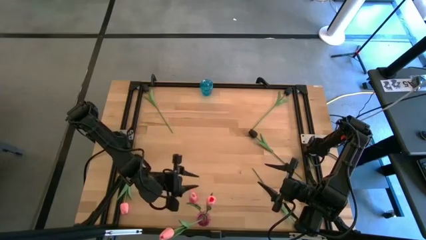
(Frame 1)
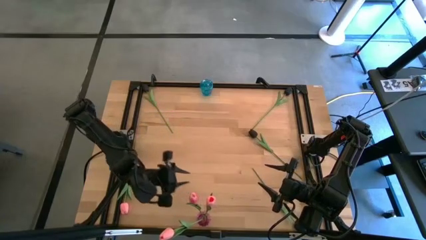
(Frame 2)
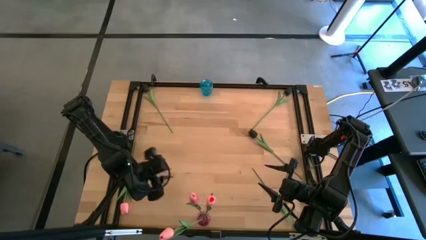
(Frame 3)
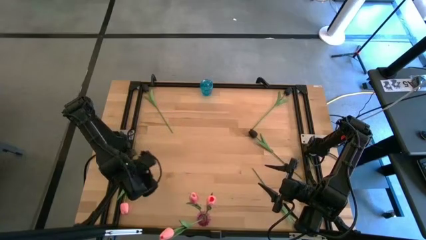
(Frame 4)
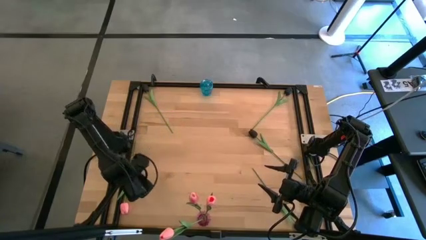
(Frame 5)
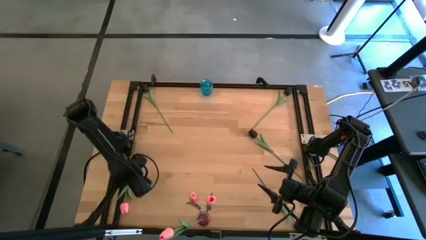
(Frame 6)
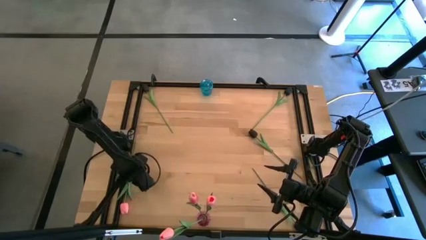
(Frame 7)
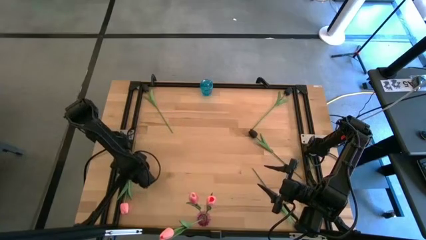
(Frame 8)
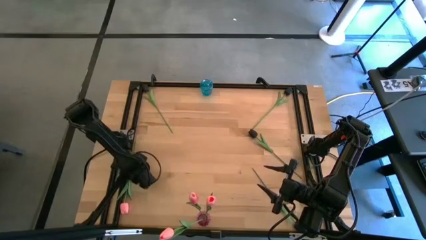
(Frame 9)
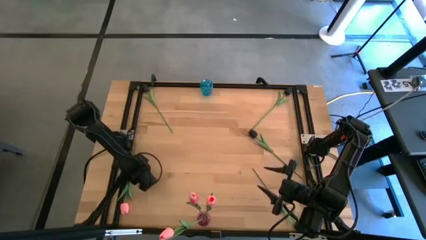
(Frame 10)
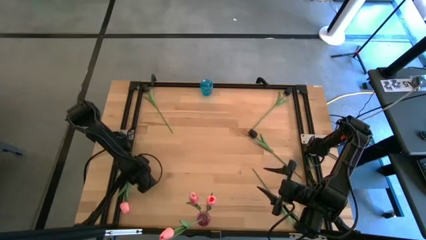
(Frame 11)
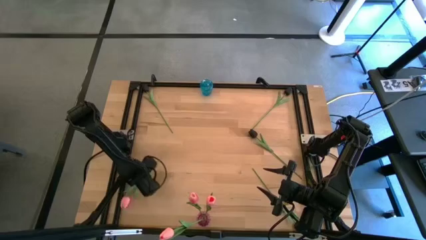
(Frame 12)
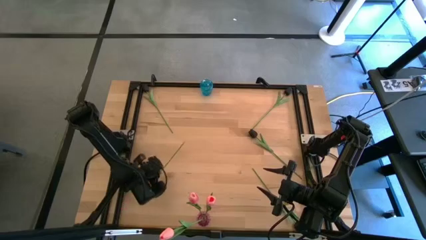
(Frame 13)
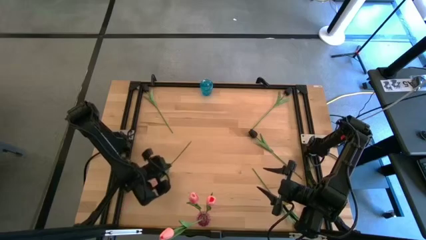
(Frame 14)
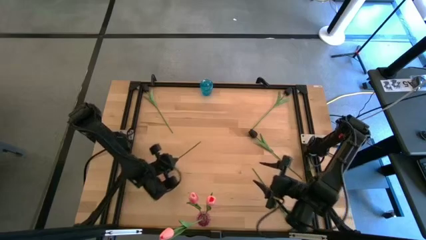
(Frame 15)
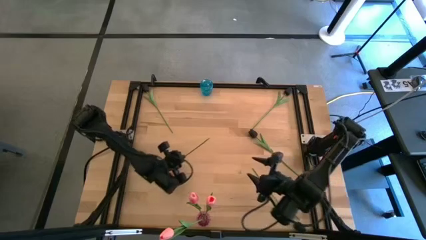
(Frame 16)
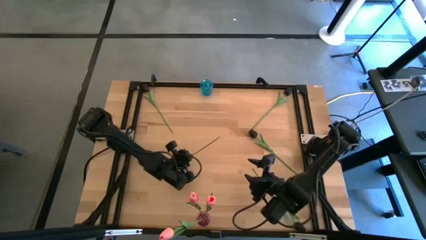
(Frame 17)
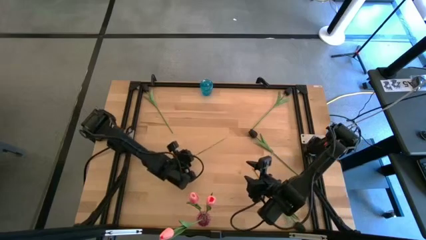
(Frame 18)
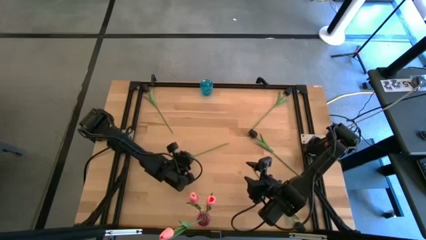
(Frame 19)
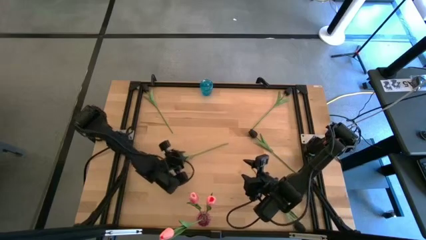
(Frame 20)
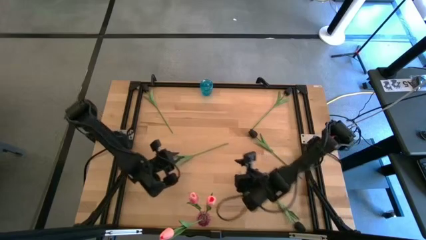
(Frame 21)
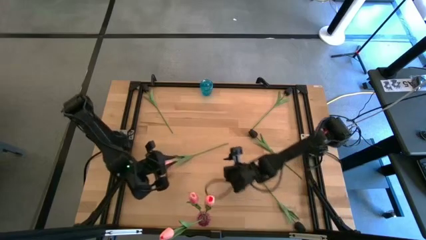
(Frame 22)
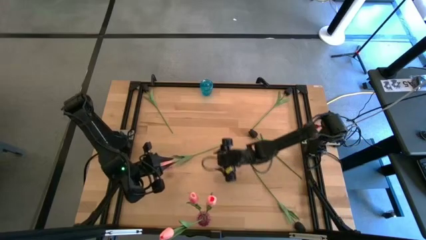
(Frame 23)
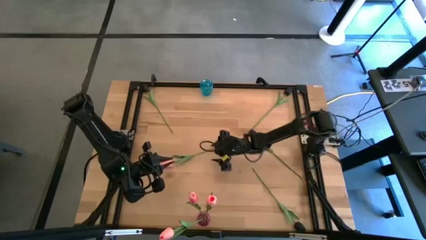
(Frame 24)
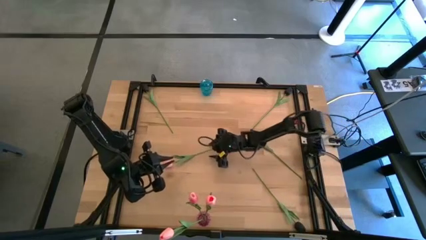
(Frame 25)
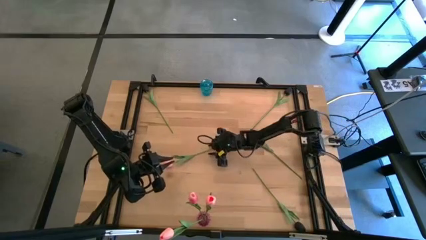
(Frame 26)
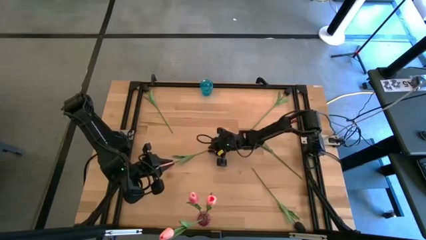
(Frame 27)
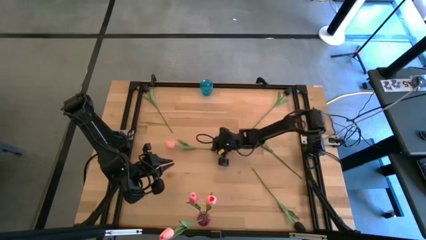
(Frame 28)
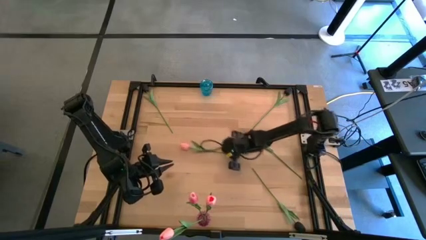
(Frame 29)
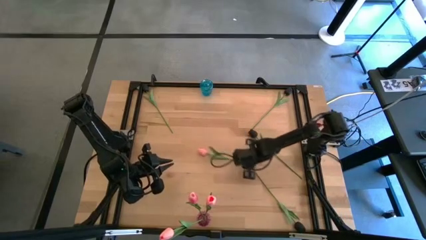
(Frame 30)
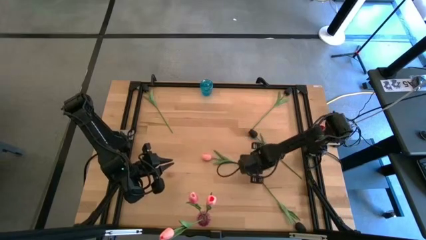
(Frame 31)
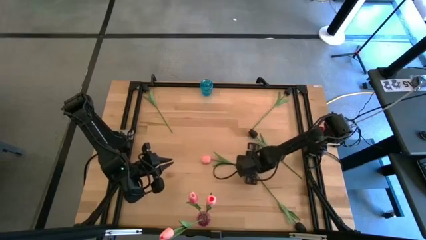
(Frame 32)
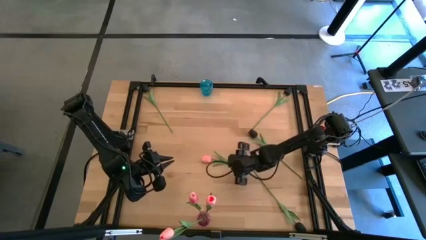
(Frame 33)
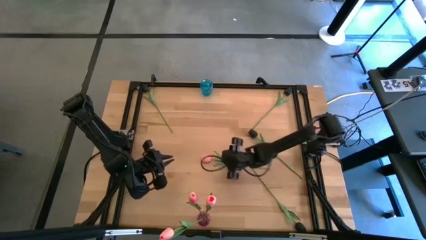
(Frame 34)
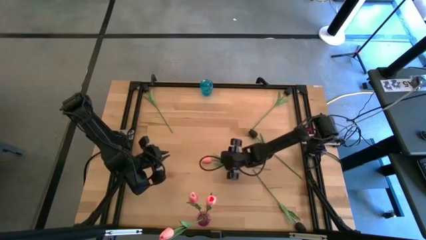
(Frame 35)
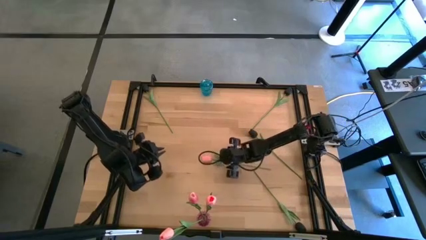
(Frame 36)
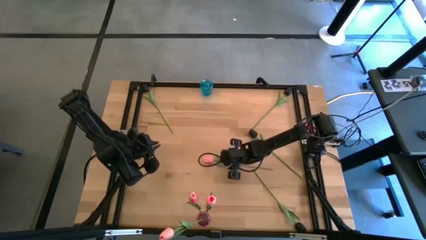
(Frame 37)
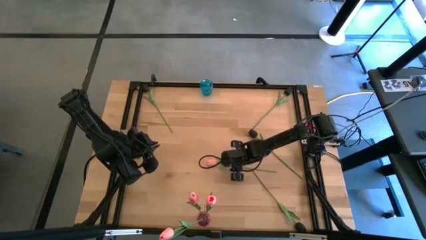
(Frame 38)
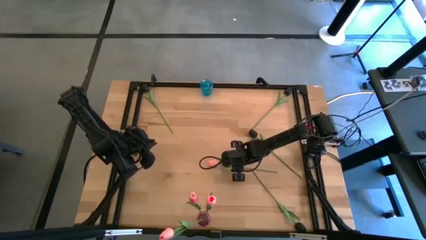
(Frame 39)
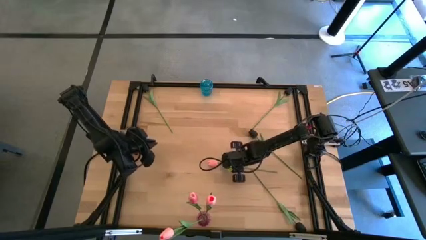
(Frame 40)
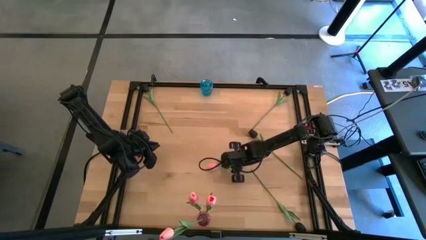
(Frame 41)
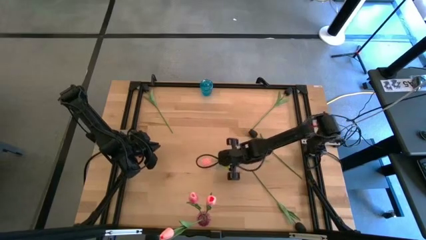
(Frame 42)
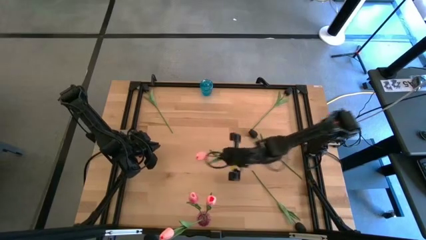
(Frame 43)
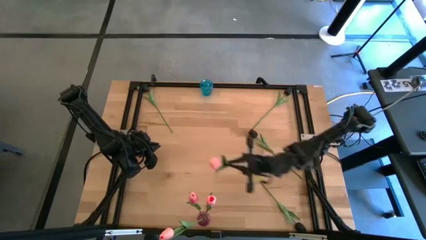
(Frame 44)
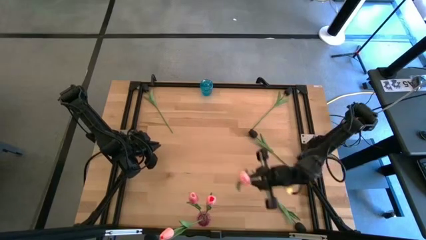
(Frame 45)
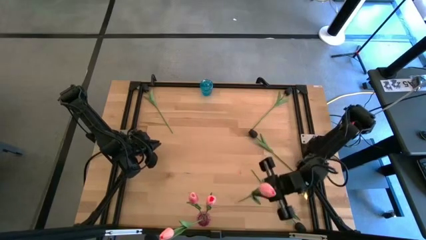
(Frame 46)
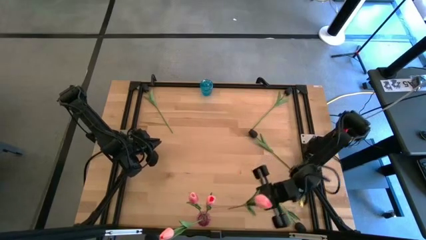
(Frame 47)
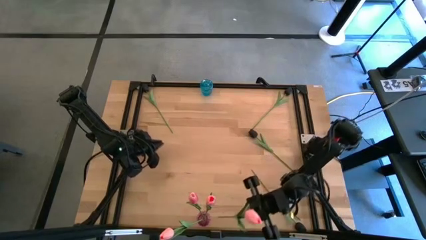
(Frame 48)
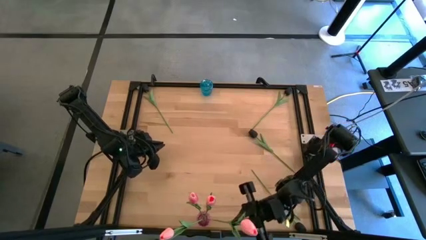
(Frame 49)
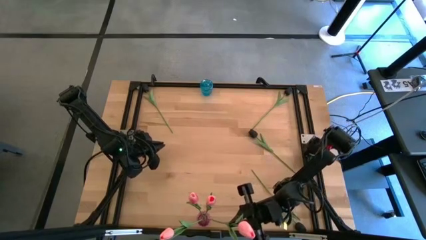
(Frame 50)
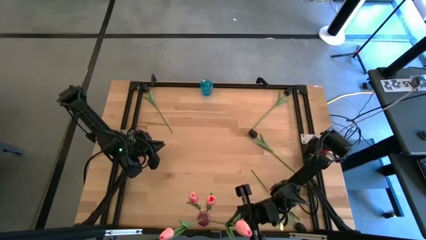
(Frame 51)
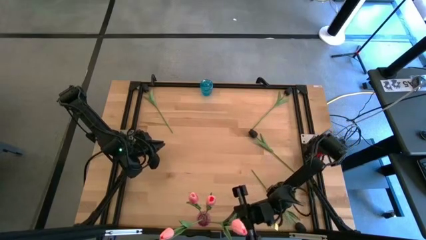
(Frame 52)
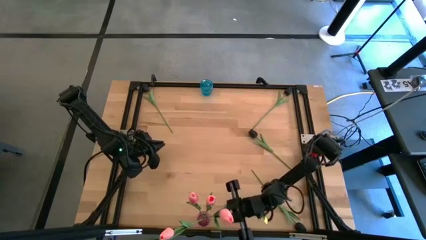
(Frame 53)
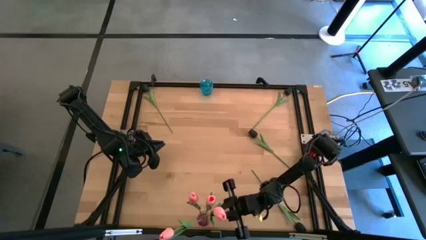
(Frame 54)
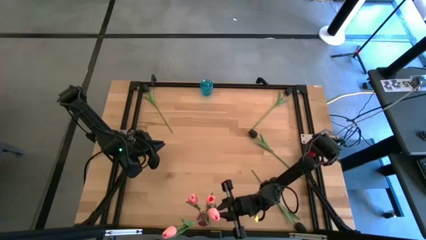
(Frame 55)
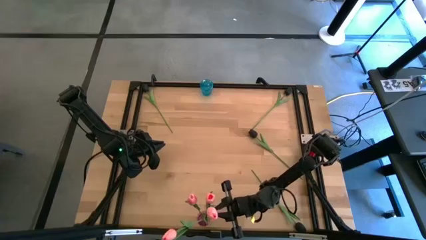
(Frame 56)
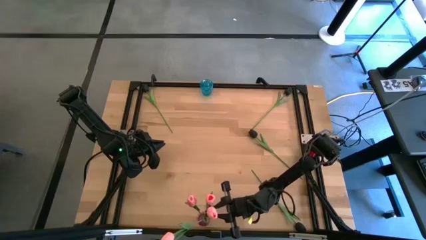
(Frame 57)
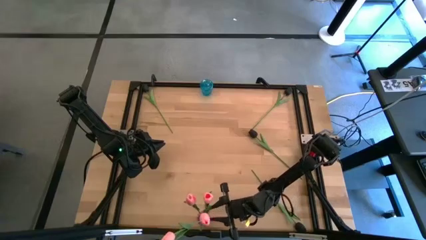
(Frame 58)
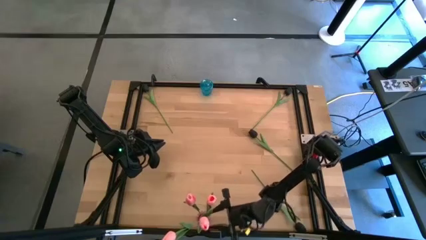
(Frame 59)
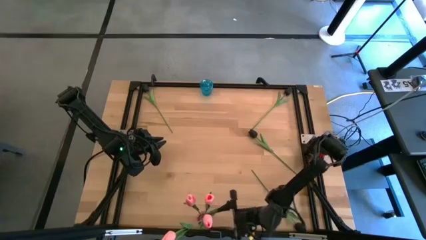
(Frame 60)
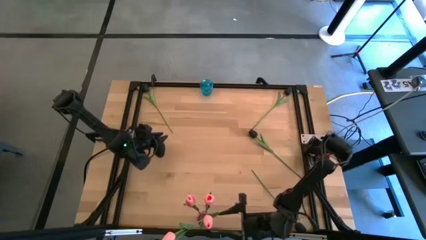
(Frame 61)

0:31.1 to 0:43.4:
Task: Sort flowers into vase by color
Put the pink flower into the violet vase

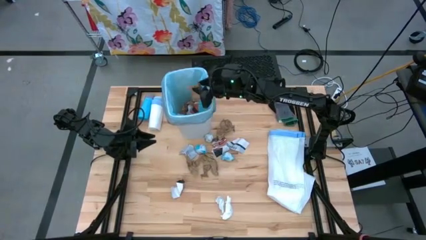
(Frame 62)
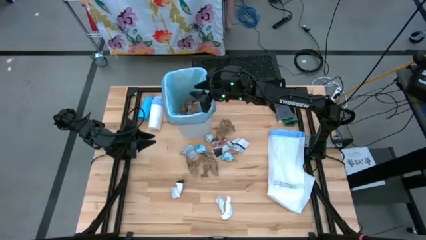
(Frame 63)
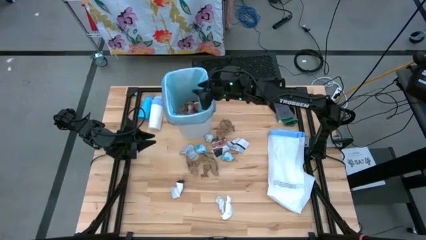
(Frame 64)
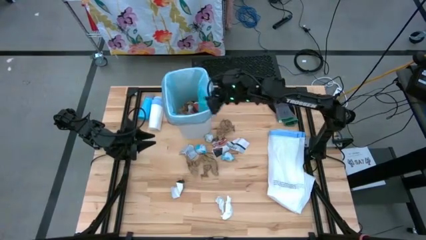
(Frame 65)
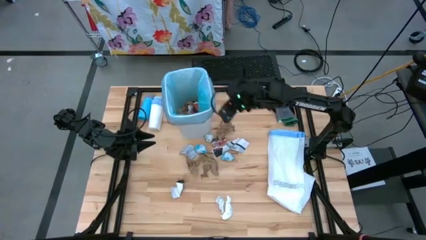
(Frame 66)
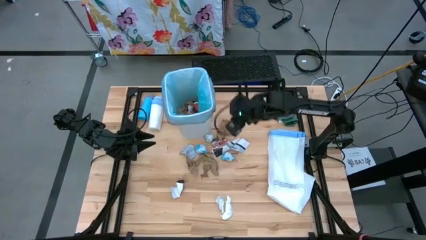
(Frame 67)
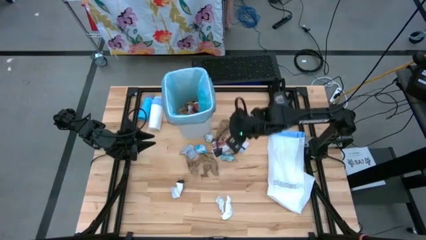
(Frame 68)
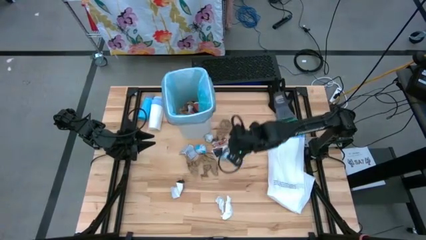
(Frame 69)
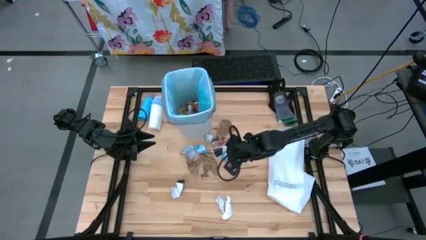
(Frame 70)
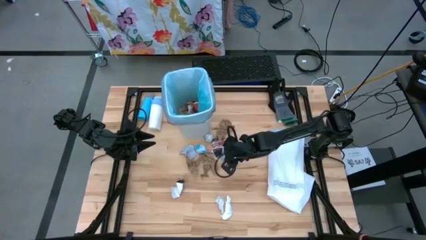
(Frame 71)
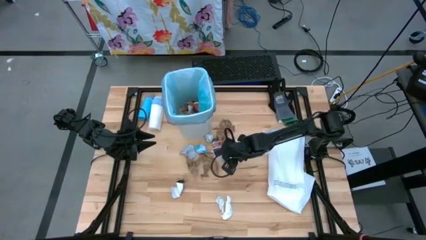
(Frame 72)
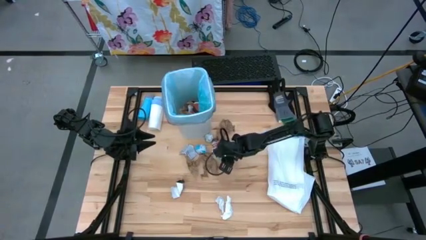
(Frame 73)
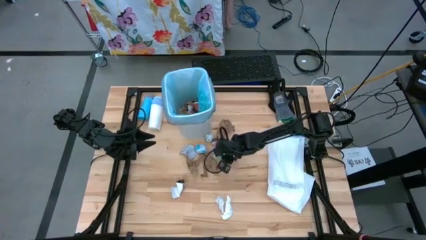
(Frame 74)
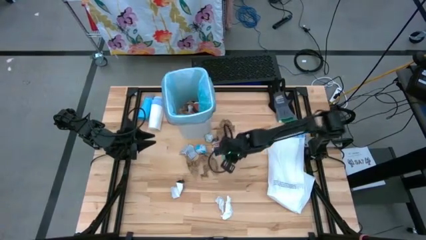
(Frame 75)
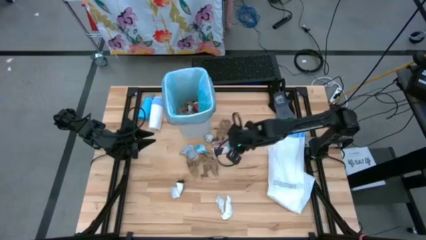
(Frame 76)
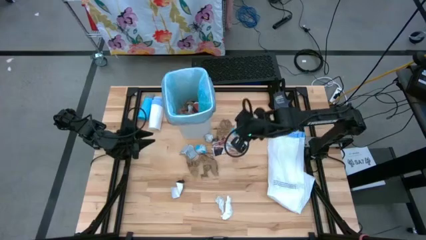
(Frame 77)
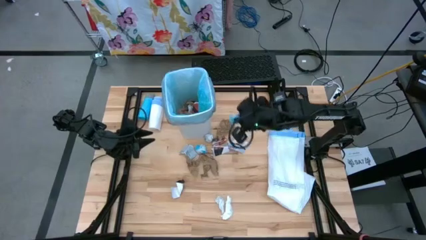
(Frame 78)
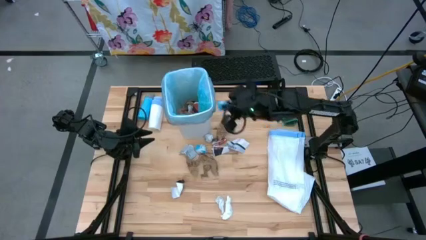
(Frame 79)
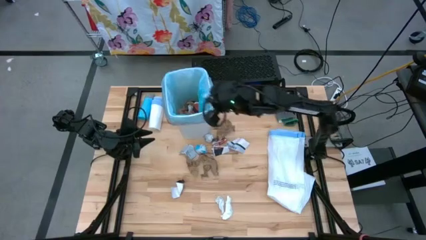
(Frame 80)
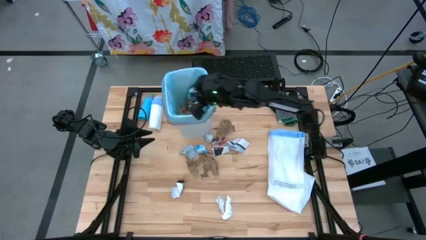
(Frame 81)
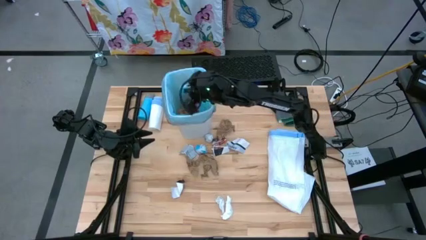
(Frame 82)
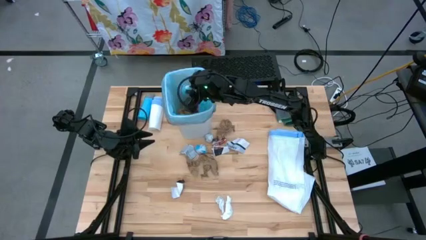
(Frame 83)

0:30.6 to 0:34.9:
Task: place trash/remove bag and relplace
Put the blue trash bag bag into the white trash bin
